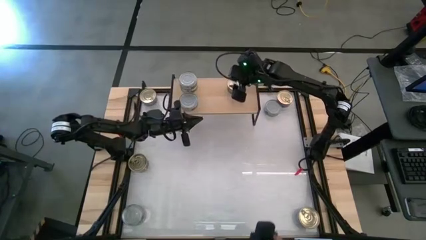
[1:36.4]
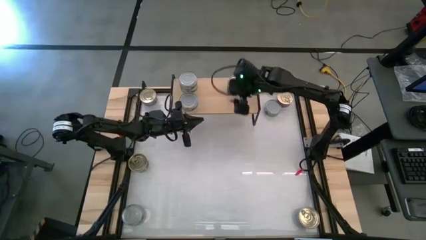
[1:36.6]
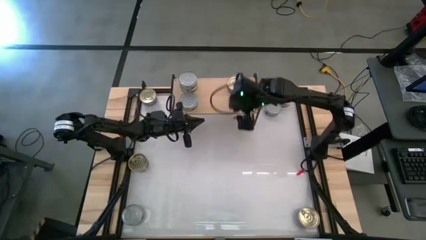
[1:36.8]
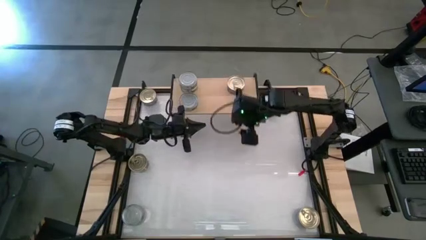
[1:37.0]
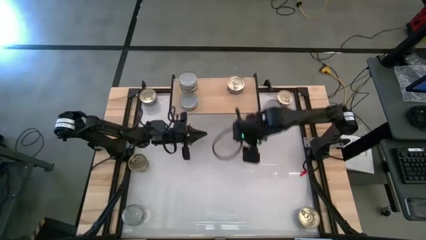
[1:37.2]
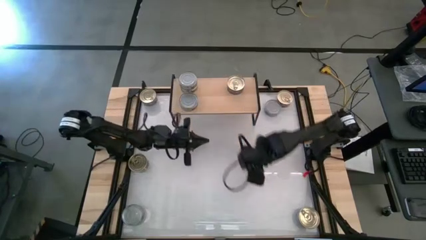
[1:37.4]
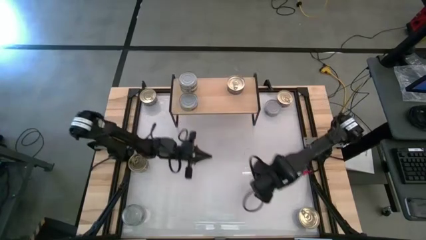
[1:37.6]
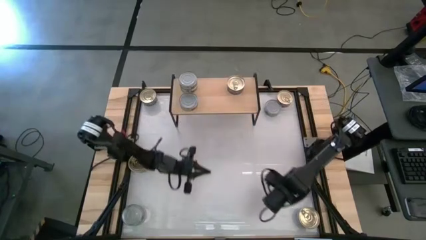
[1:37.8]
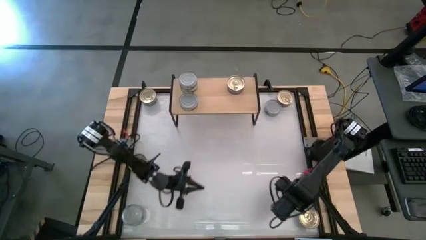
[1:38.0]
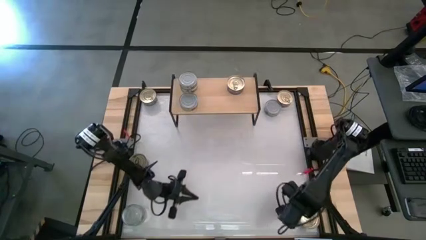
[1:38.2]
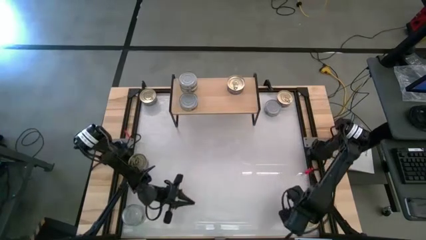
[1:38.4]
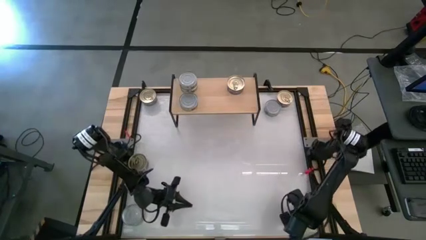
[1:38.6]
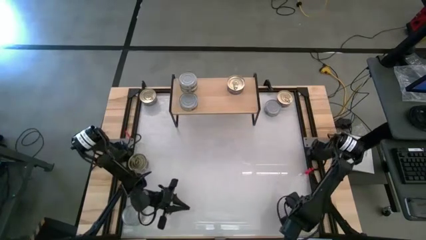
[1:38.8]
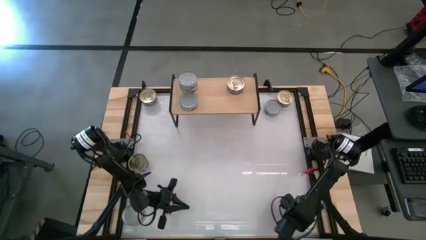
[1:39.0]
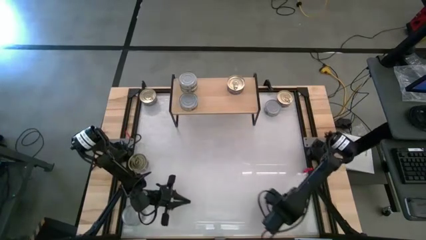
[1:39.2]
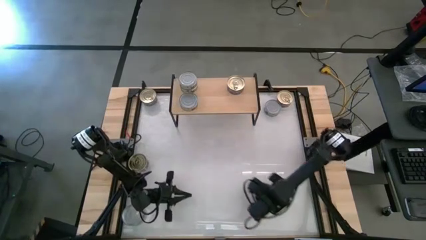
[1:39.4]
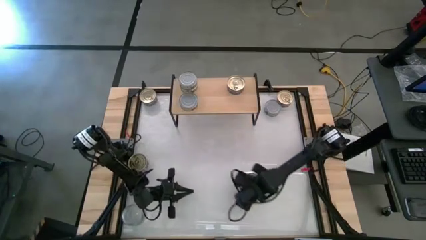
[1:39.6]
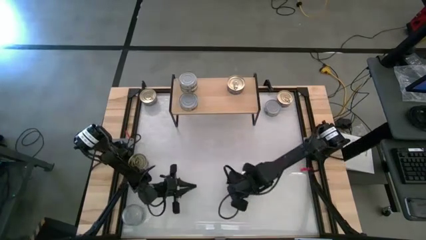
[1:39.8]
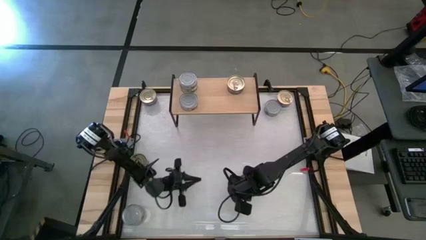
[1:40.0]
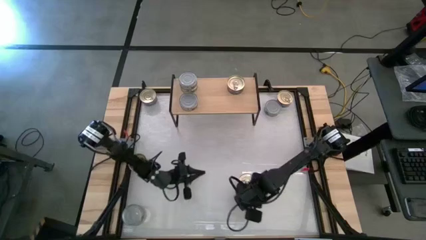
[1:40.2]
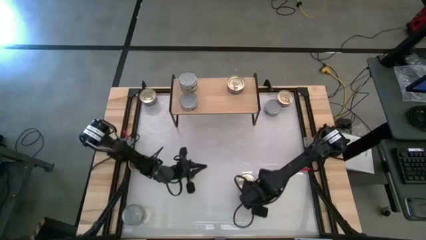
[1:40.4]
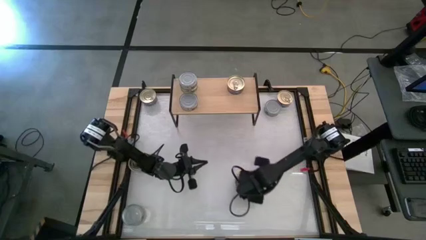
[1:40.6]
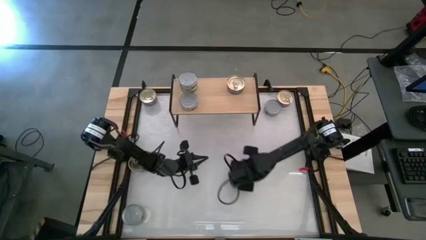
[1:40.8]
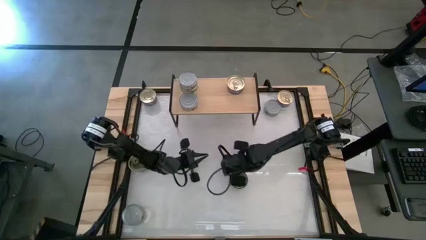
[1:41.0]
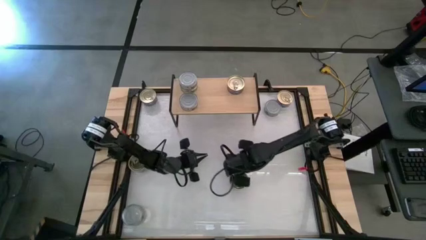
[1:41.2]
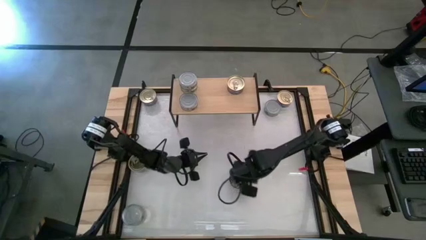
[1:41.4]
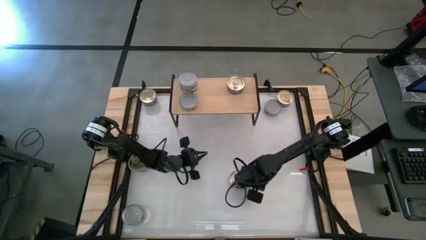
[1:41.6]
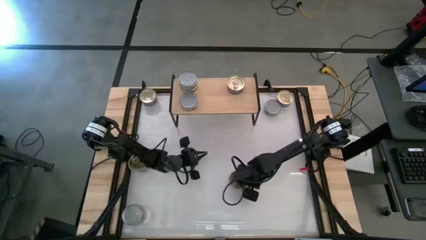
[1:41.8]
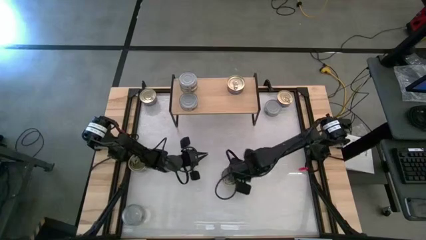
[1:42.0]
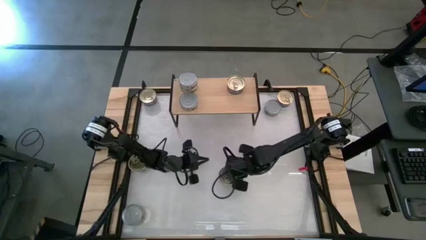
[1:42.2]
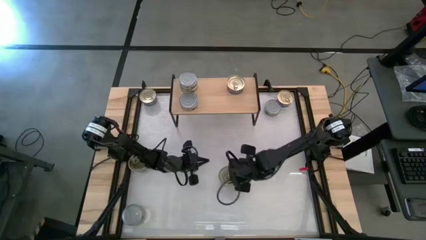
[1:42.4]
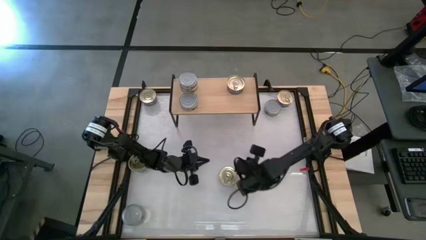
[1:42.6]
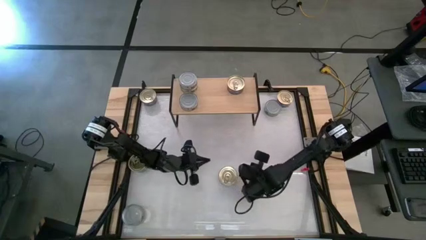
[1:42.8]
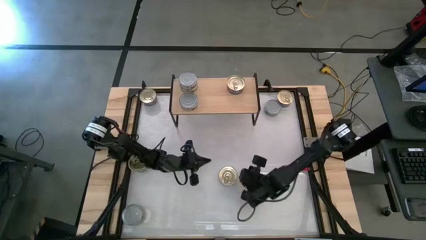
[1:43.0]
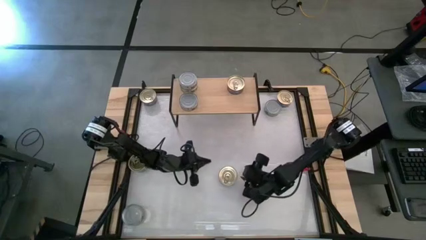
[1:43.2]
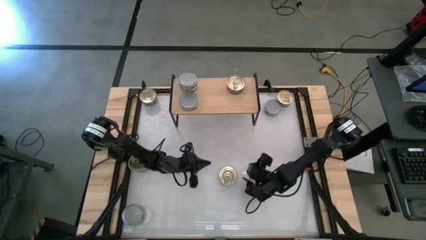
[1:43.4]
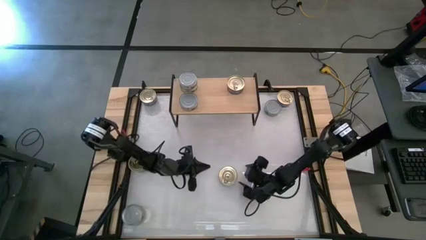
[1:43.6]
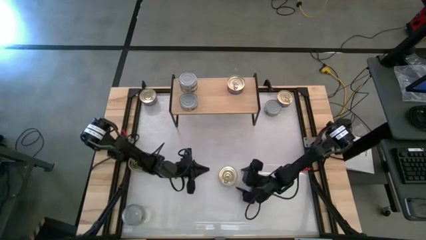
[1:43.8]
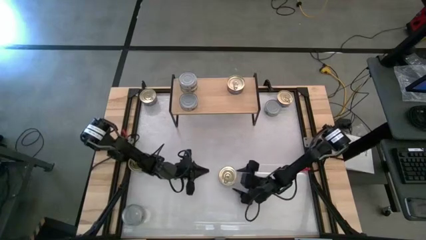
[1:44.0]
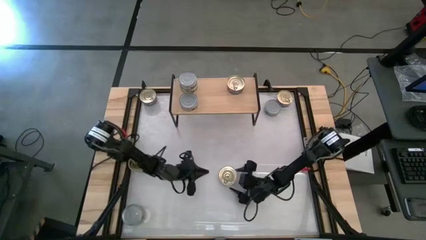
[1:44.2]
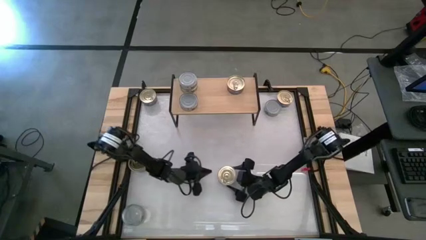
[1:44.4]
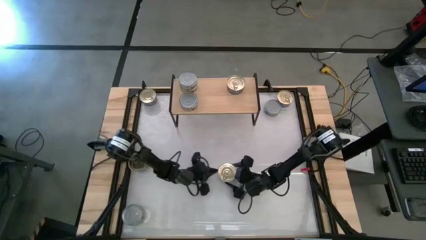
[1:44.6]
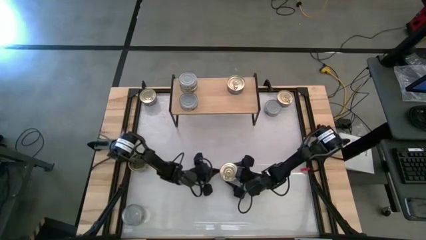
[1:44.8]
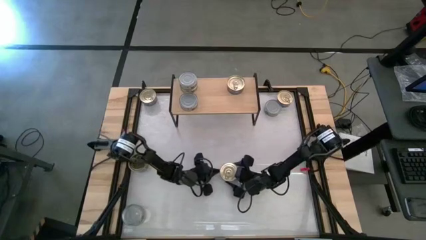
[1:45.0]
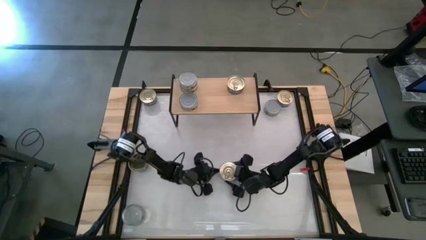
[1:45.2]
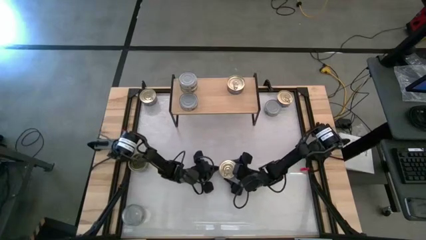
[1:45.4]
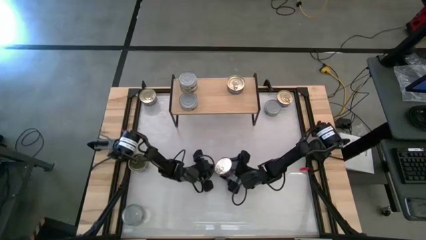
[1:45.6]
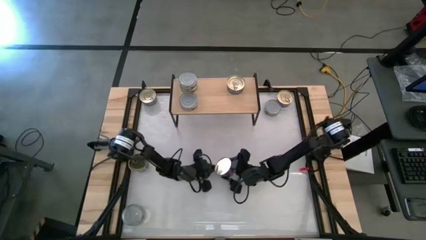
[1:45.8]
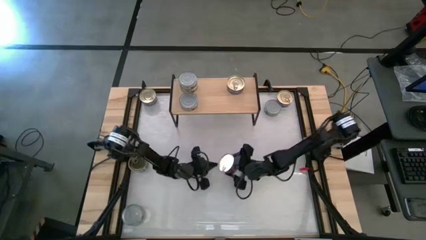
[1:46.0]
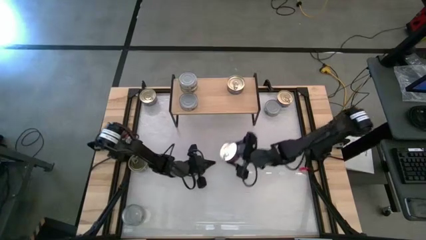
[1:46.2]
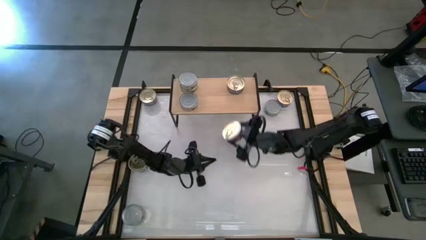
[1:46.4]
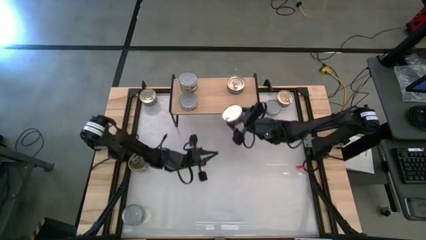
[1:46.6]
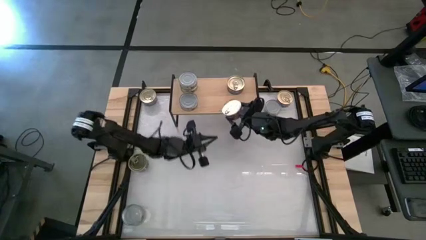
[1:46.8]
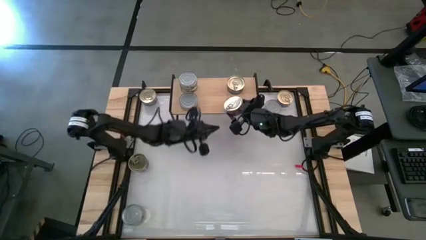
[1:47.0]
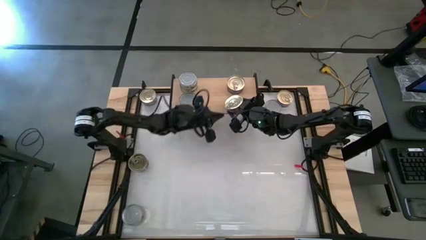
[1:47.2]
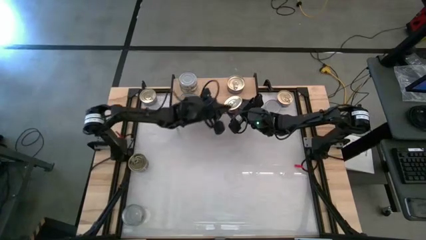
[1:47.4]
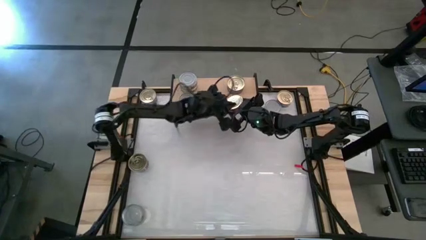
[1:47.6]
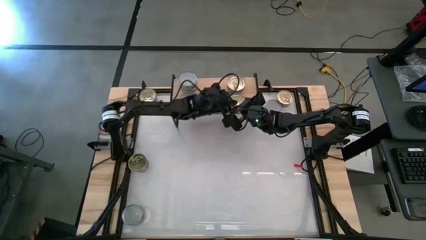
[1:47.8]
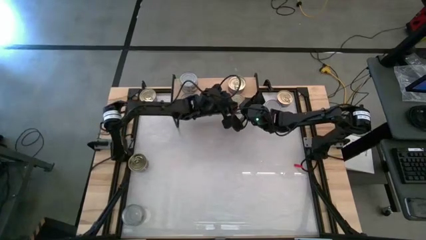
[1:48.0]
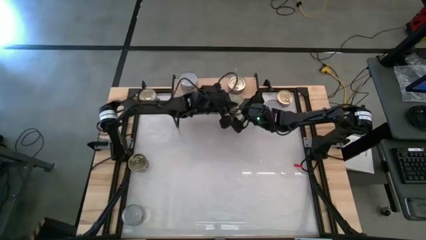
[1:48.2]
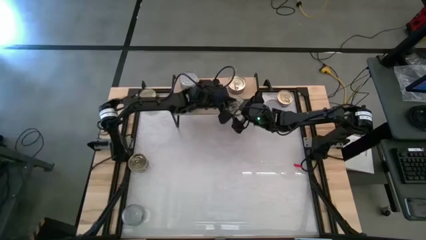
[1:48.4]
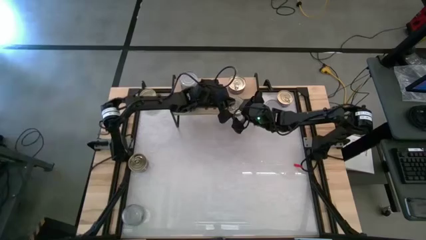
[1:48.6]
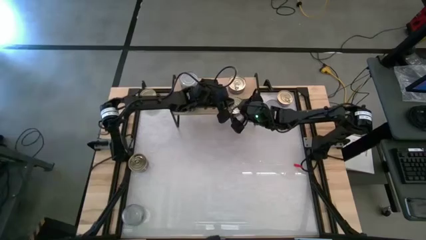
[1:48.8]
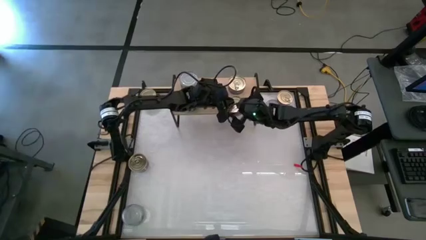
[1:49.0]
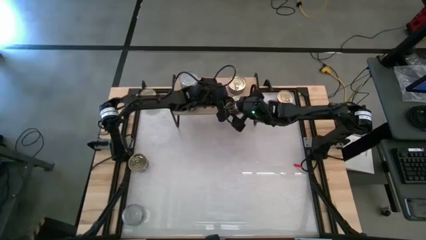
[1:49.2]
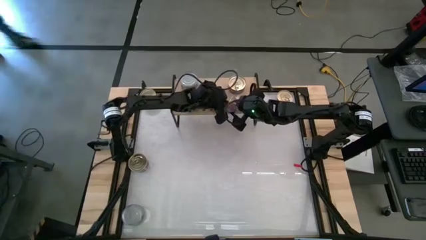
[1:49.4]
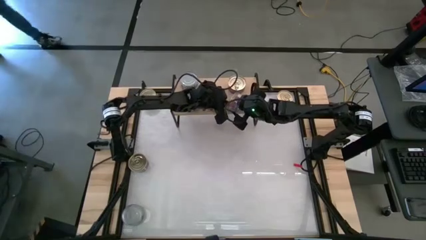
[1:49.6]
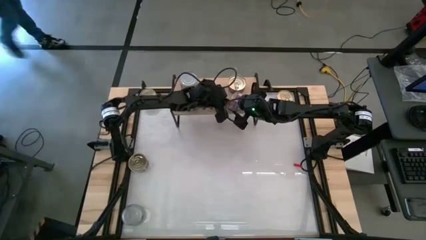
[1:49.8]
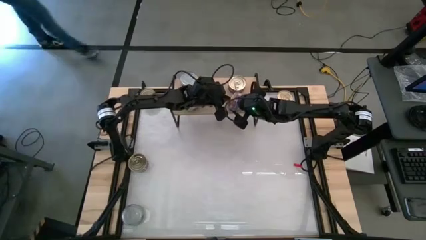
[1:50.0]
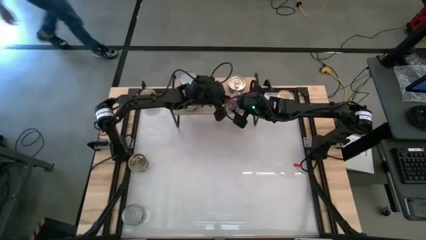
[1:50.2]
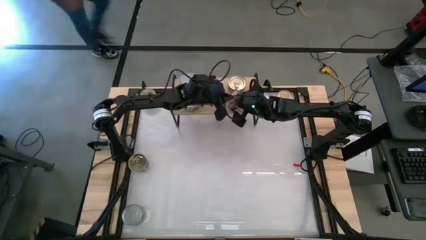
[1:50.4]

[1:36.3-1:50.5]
Task: Stack canned seafood by type on shelf
Put the blue tuna can on the shelf
